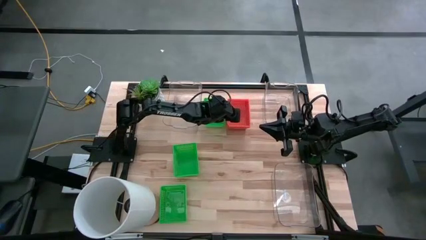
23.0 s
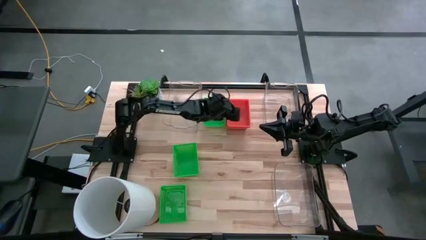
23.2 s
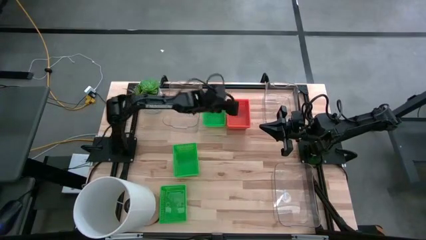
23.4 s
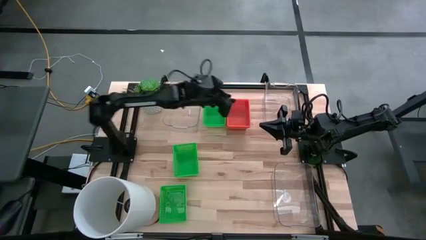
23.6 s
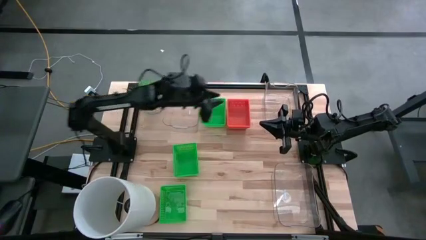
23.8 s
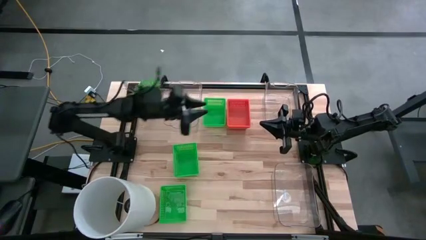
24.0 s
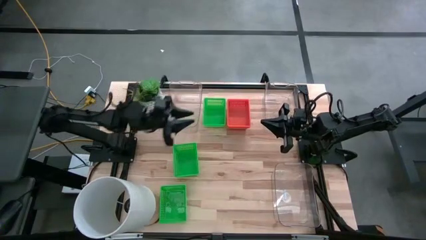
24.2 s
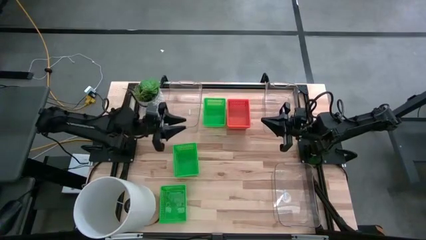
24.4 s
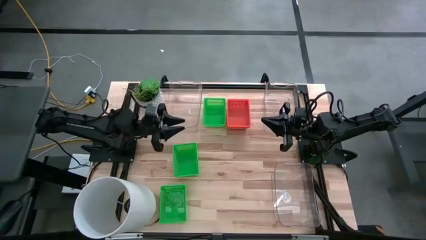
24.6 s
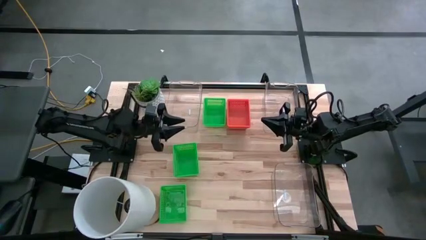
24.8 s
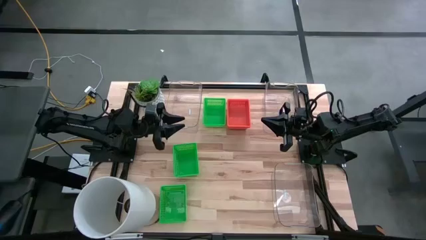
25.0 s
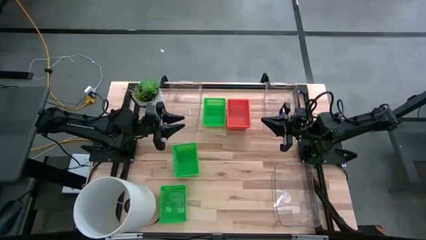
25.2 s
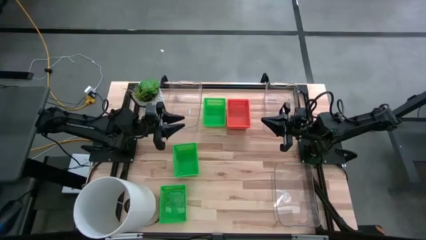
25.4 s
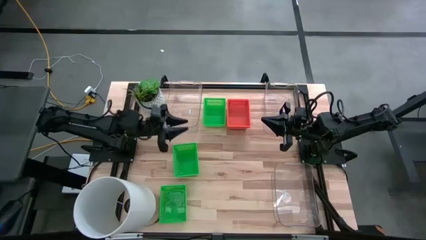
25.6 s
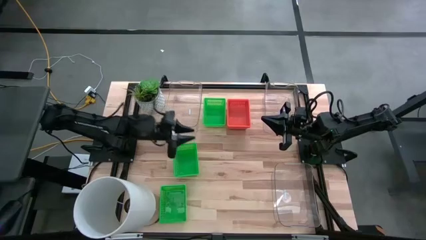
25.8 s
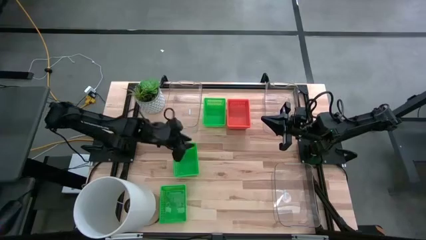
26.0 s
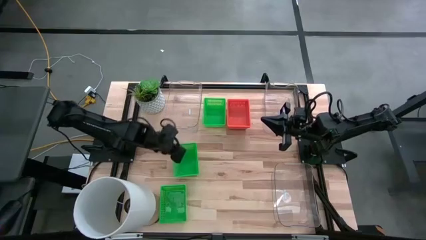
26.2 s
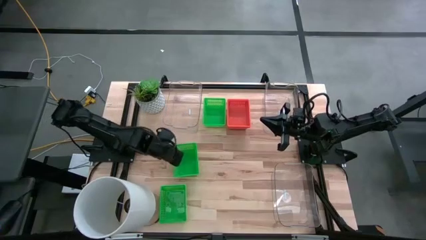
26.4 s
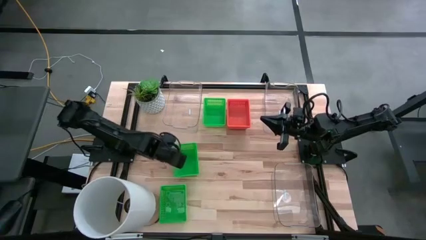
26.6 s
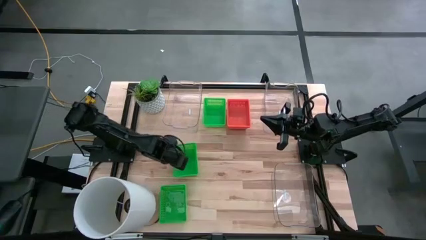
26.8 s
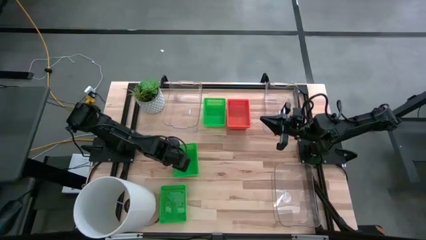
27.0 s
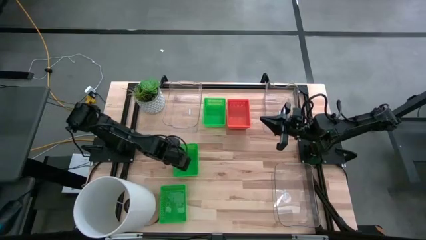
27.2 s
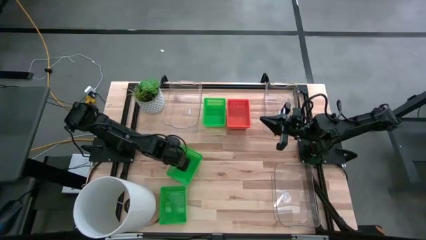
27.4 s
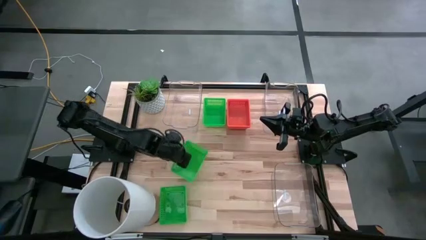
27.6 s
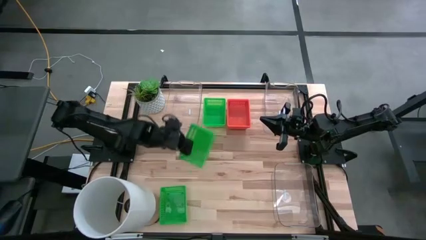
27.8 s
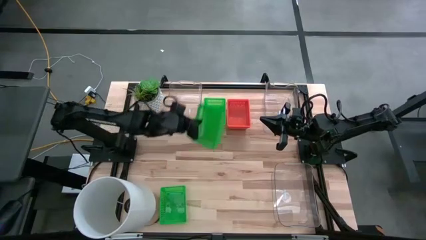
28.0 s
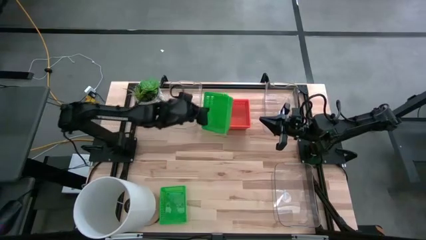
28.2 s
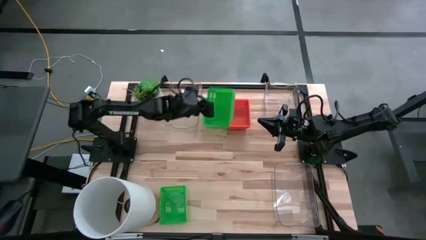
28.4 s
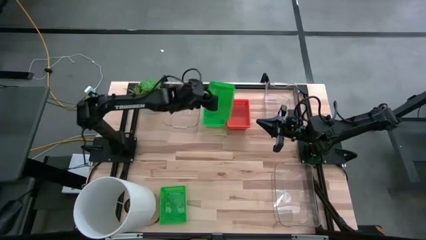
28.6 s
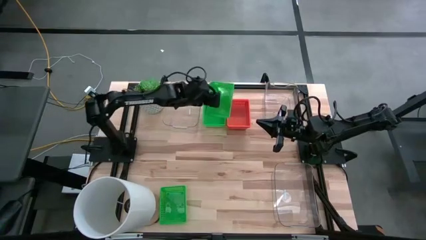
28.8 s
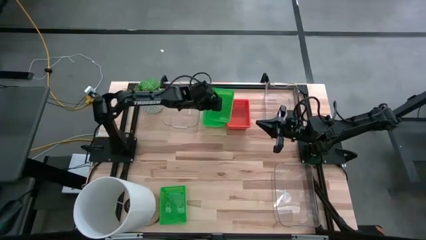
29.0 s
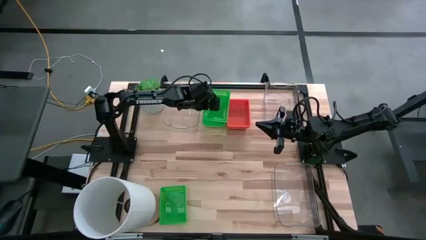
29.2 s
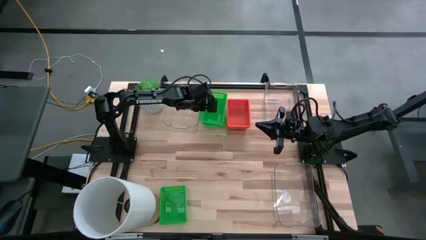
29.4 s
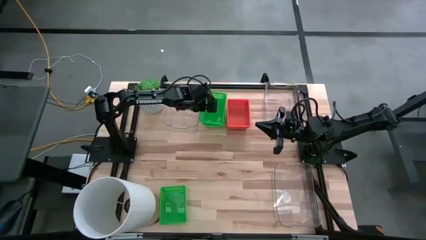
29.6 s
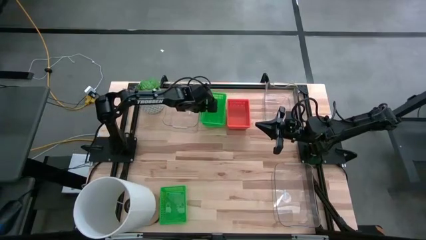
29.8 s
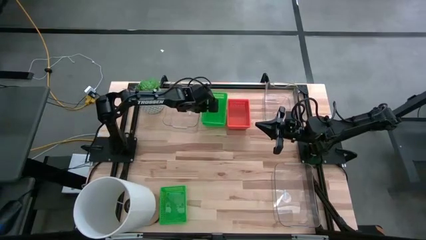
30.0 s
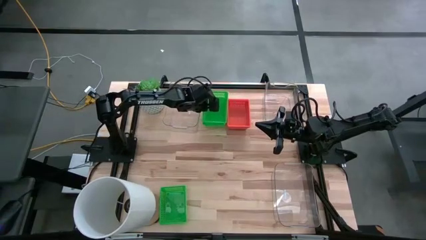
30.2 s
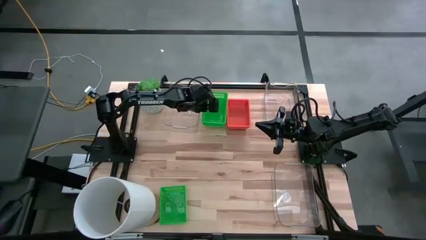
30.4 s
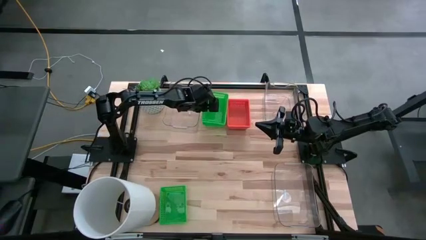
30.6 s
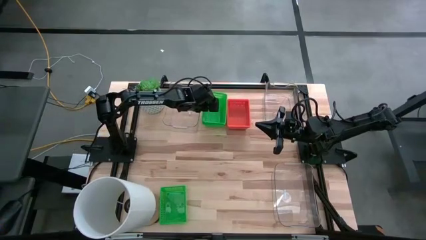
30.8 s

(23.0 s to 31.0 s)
Stack the middle green bin on the top green bin

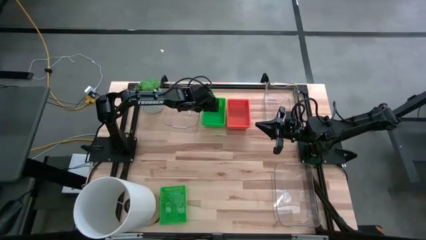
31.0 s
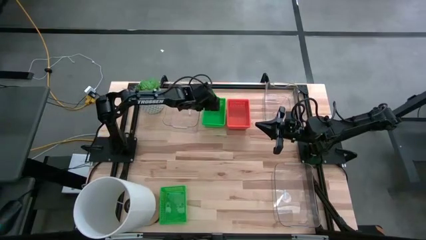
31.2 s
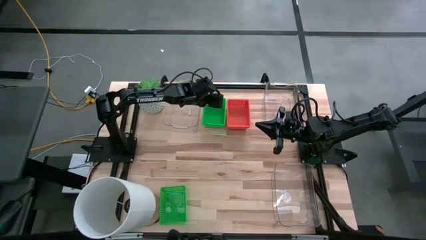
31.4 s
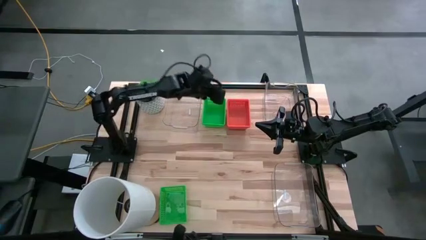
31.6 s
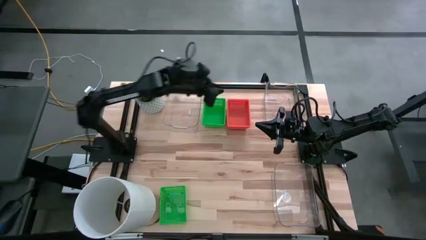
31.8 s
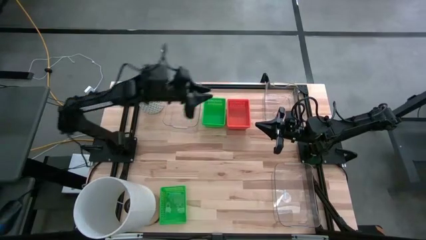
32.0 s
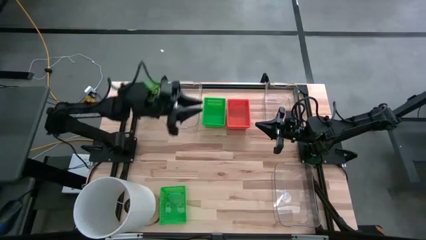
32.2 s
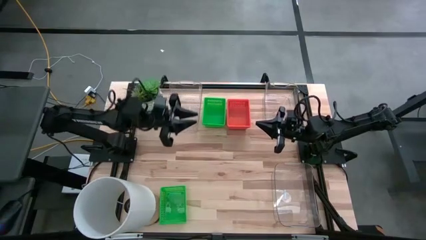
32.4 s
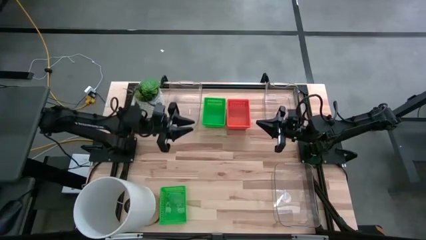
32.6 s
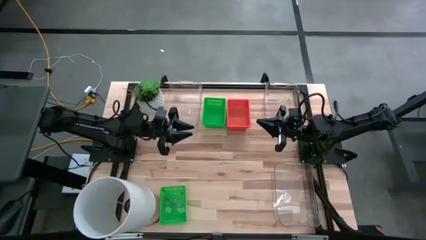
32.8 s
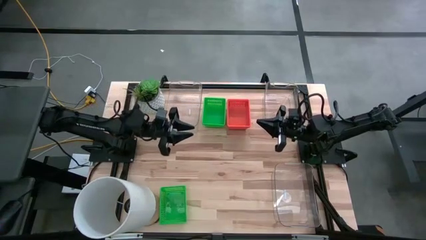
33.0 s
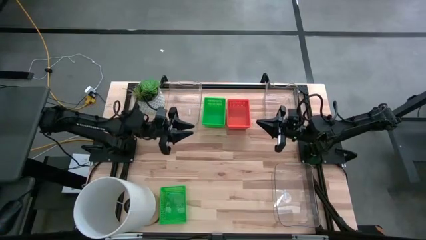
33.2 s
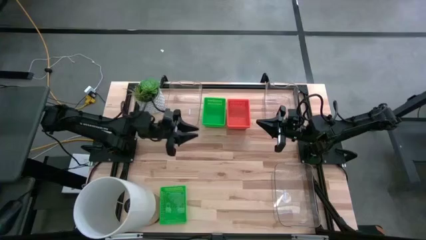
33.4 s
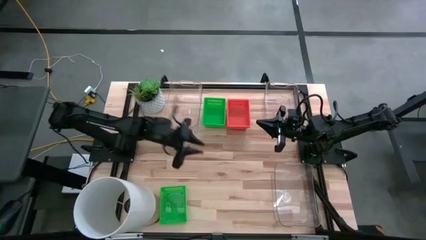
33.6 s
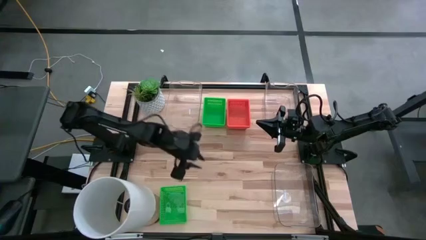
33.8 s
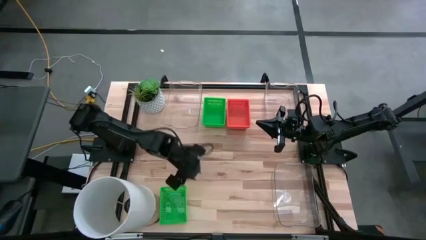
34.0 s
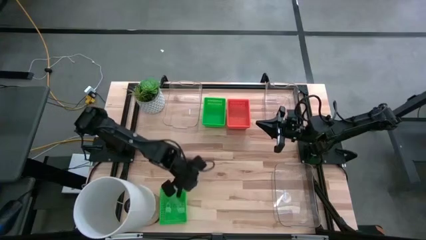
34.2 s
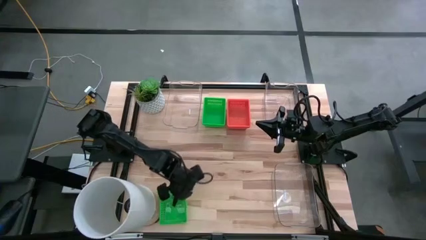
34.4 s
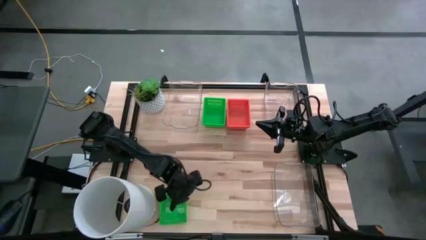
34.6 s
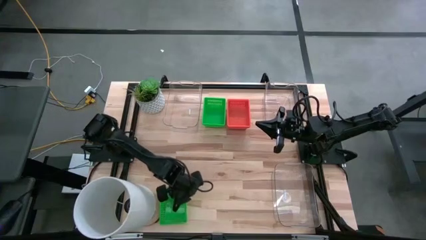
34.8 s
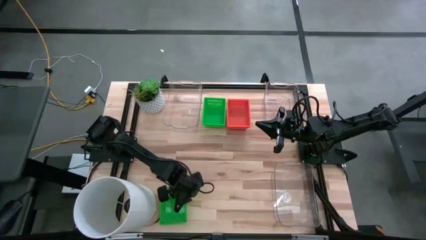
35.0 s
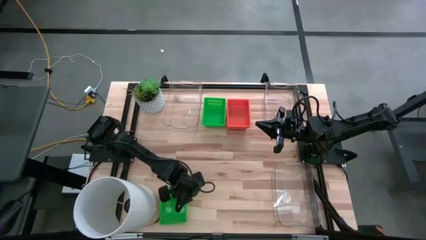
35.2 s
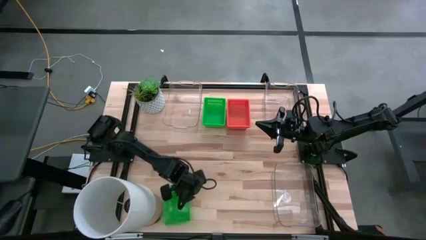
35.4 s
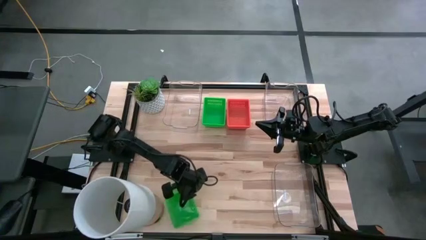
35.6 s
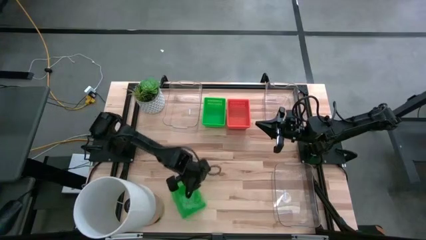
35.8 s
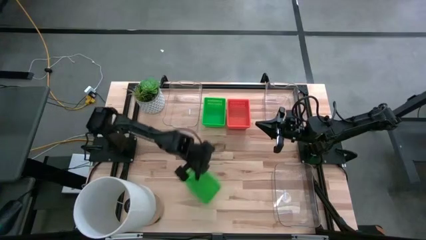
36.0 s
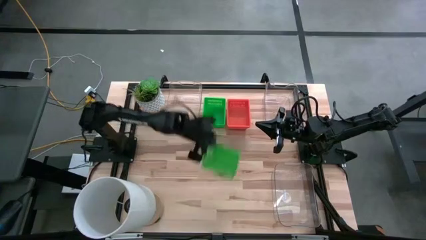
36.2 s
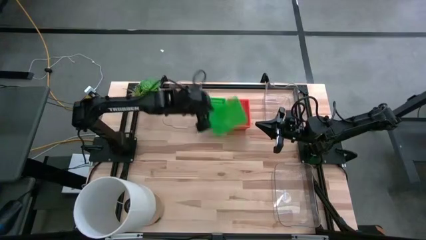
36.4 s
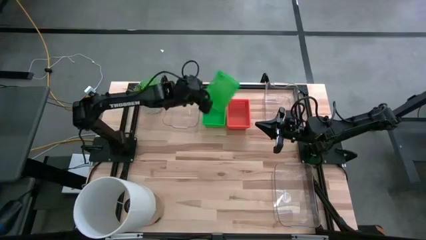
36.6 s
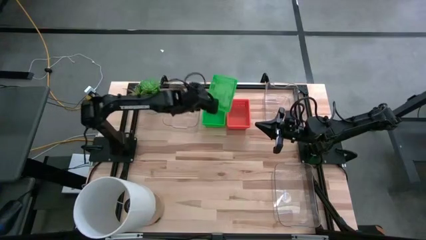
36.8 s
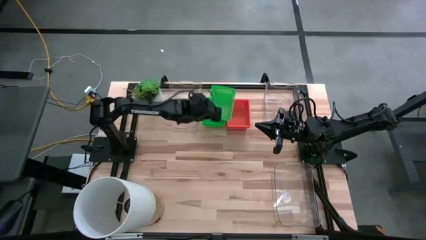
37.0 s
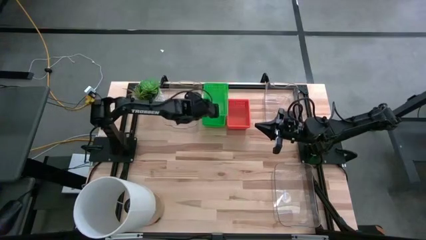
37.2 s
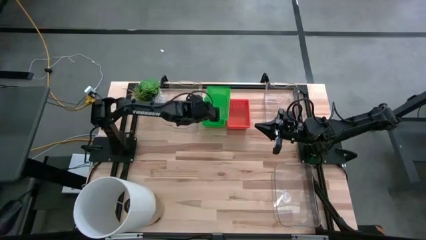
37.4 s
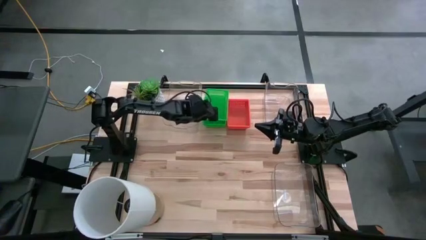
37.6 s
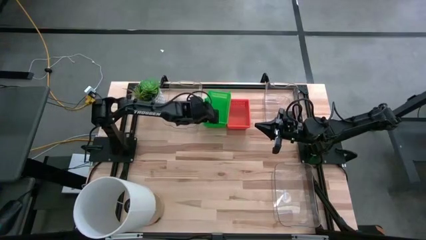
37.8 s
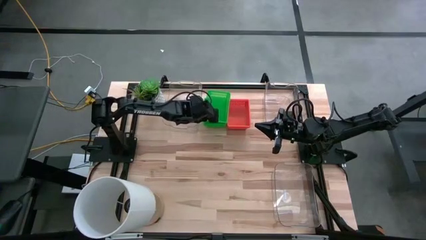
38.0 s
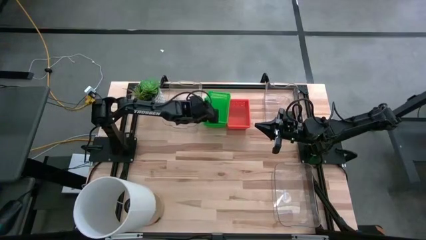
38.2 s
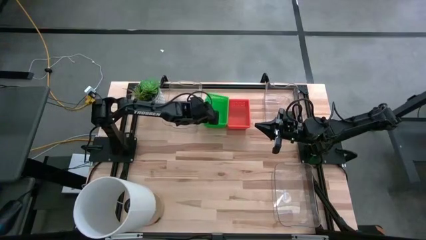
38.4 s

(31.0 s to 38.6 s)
Stack the bottom green bin on the top green bins
